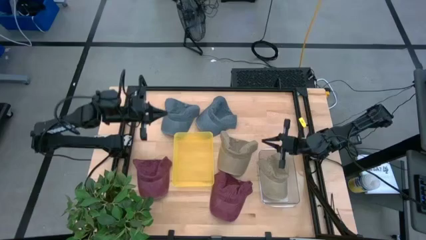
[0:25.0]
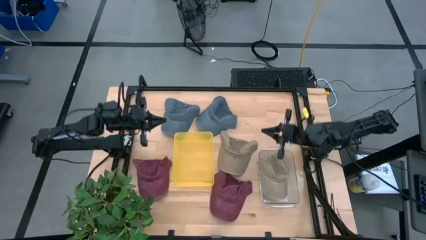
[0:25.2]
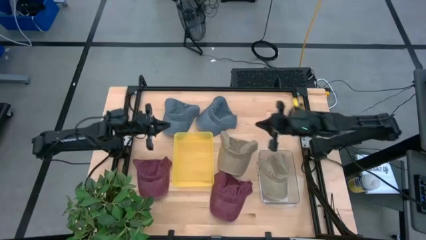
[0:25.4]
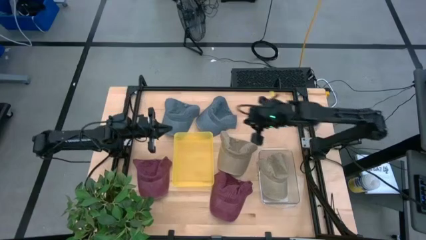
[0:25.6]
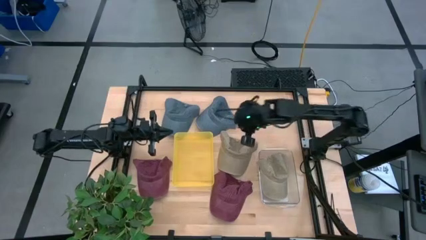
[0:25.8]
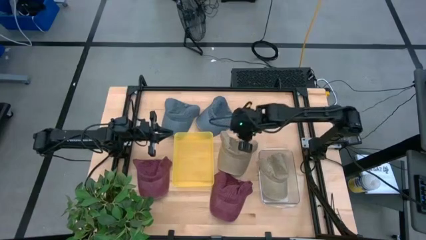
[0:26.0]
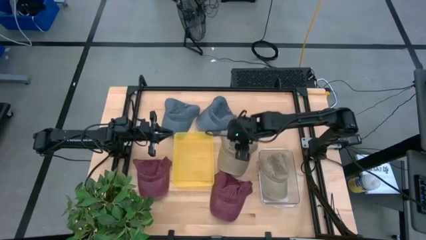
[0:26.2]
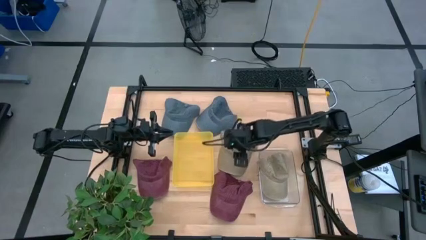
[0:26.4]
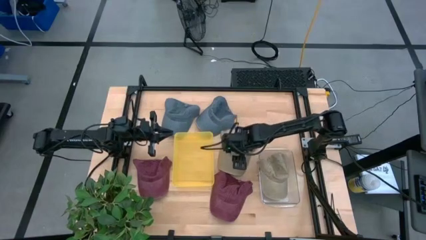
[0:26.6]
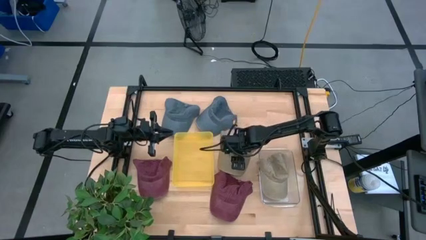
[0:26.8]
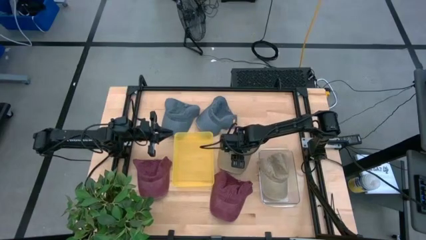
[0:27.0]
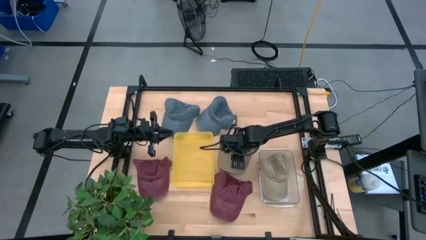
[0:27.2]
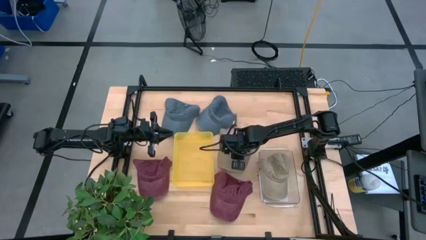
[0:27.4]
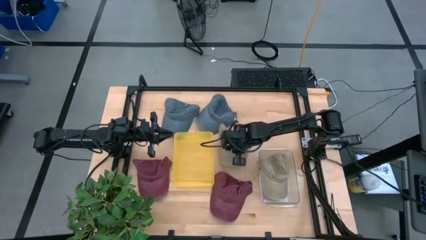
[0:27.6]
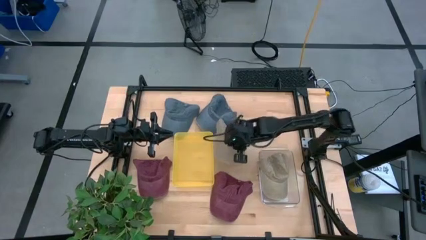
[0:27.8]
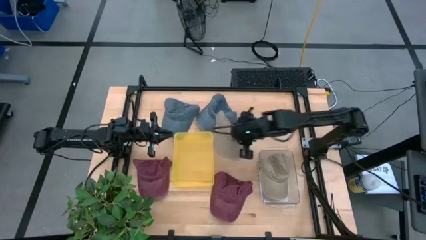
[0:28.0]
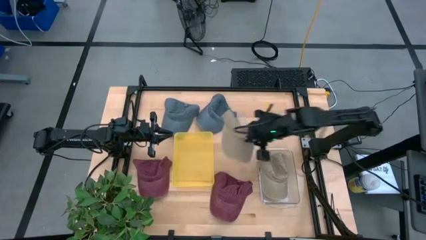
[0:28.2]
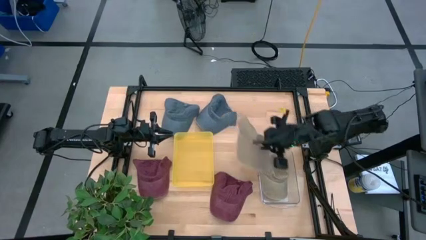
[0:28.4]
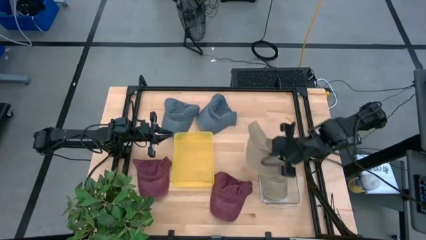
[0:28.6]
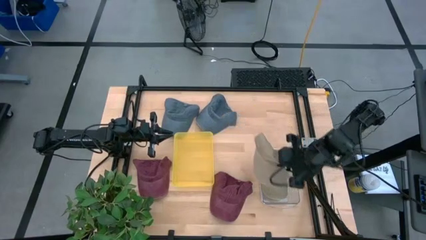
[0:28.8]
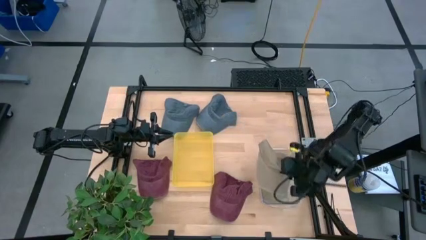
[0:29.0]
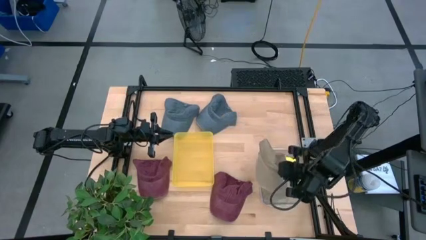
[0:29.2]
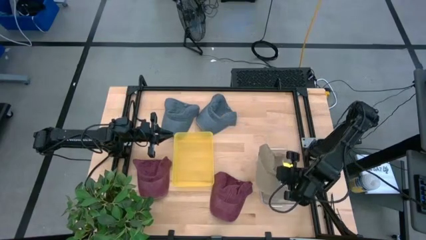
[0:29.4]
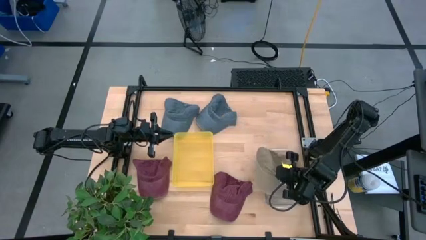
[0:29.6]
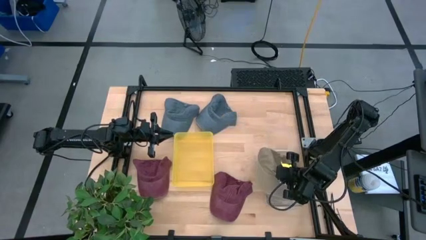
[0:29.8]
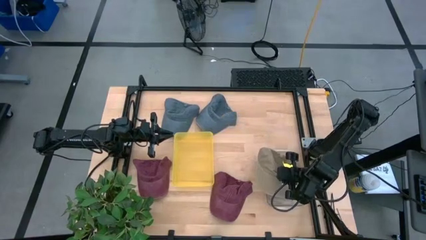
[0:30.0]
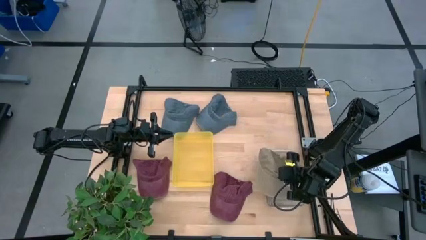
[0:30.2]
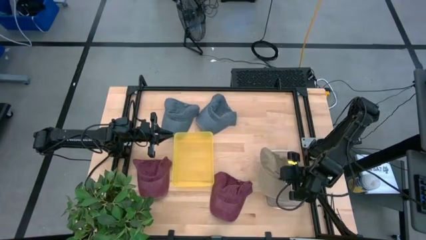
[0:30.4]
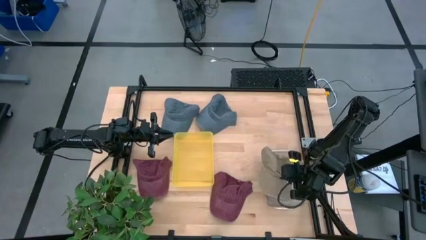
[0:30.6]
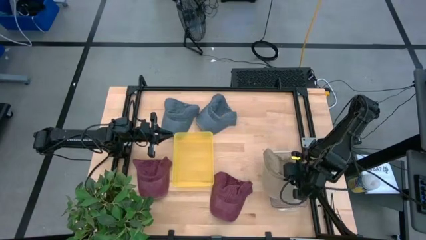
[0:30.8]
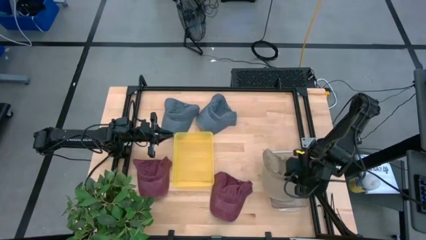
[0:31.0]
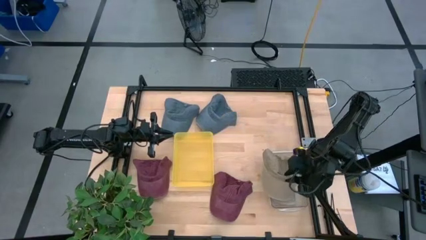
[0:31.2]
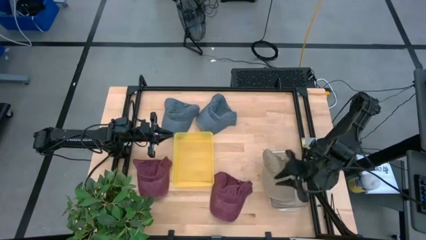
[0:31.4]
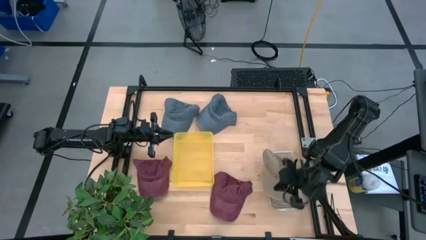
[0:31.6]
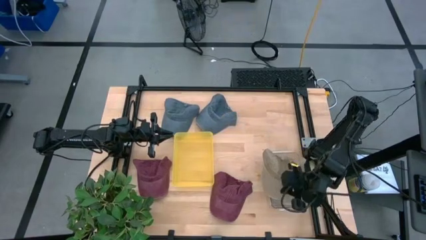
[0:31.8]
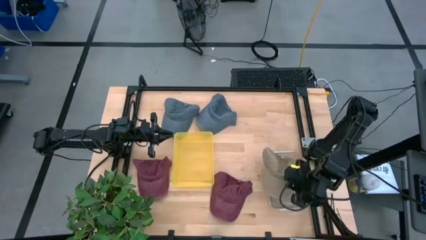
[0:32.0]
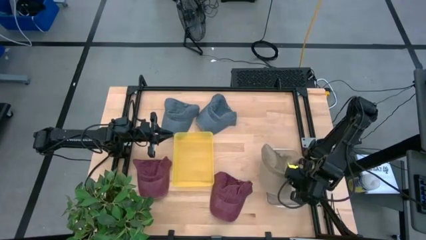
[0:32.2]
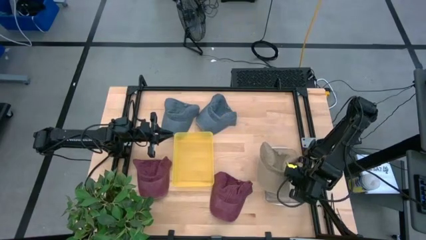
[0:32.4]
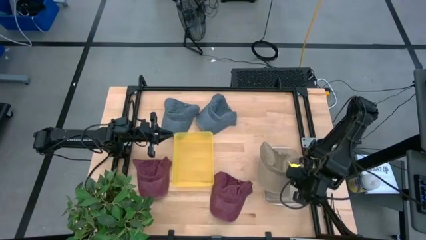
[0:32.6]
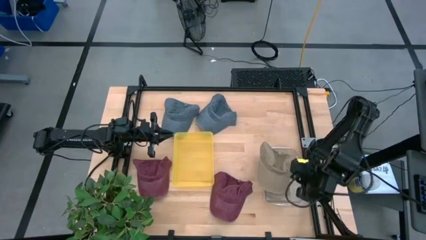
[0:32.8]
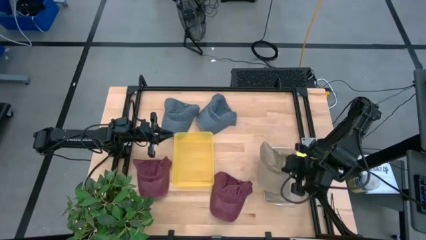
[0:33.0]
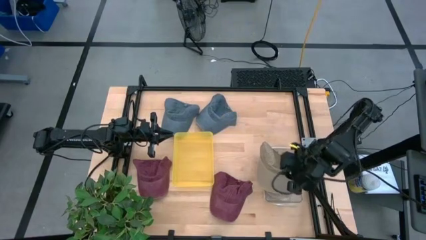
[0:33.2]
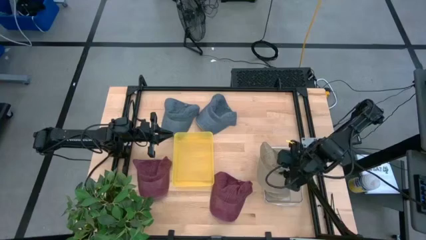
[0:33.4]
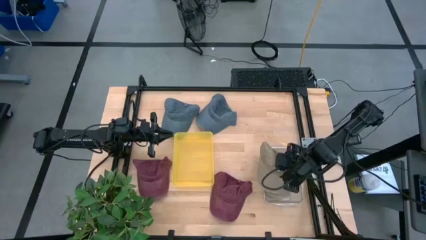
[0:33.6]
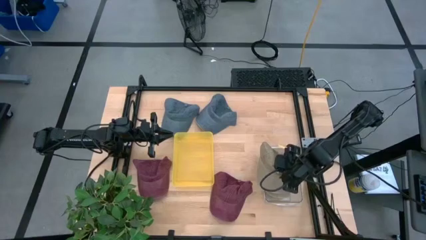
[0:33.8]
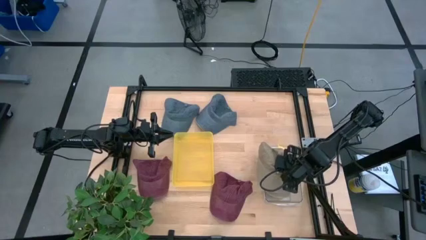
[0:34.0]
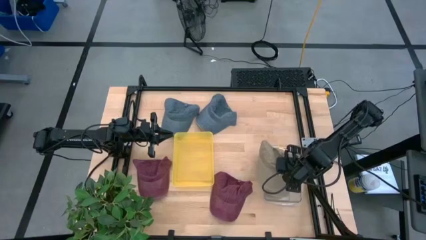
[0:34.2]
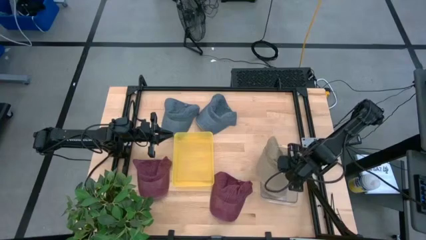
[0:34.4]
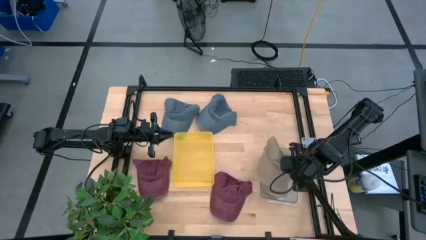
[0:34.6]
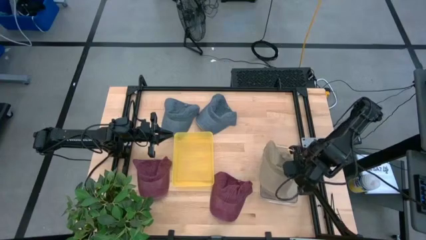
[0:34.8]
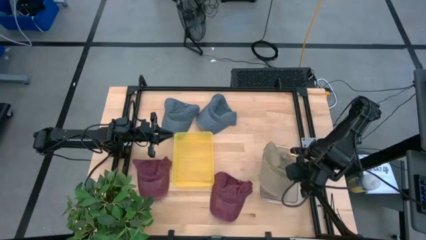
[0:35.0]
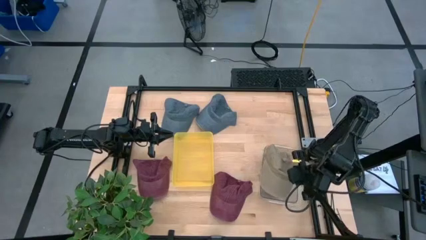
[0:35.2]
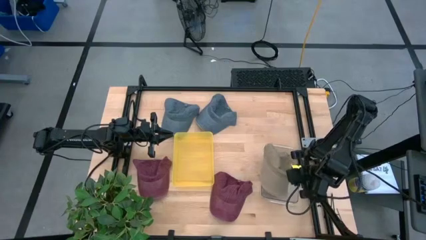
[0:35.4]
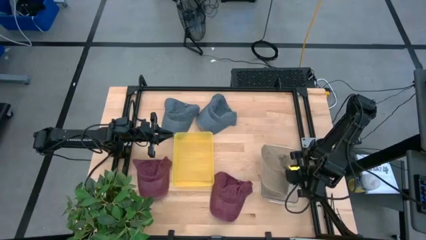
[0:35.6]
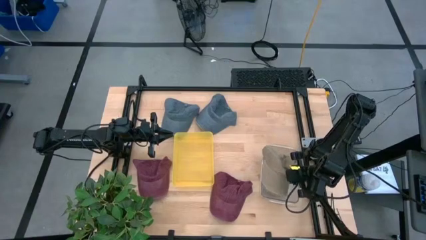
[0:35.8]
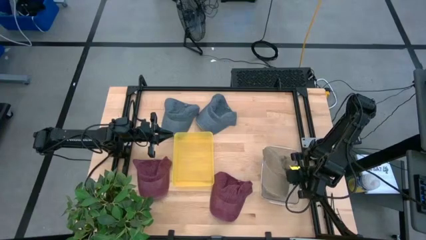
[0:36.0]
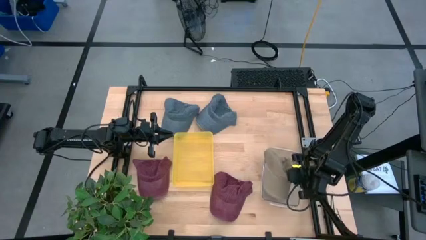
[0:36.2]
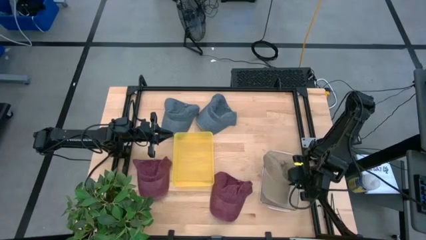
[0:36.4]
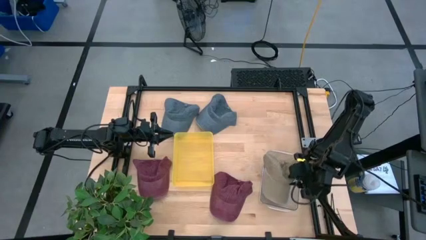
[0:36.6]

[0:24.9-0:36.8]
Task: Pick & Place hat
Put the brown cap into the transparent bin

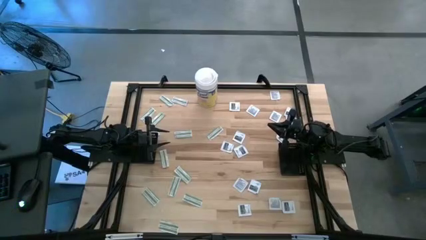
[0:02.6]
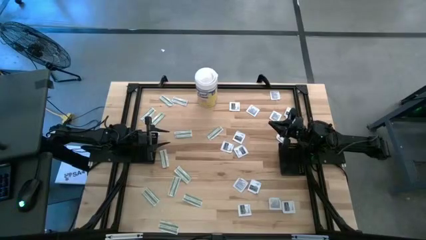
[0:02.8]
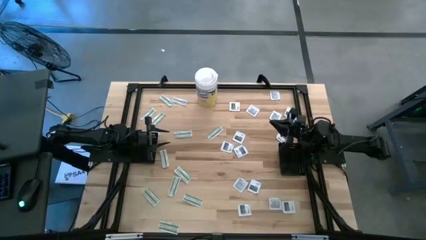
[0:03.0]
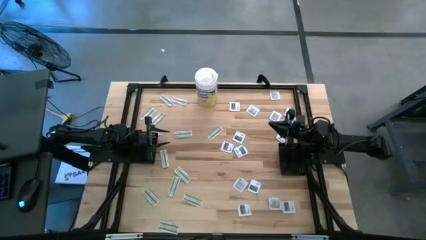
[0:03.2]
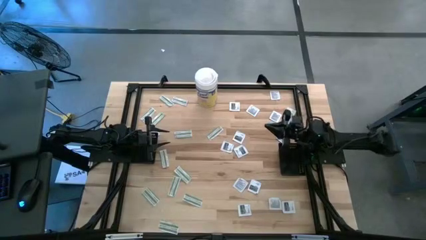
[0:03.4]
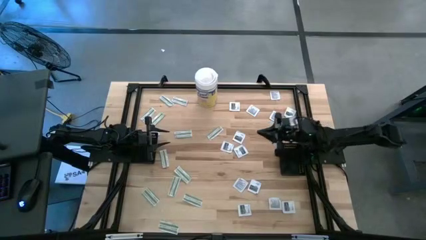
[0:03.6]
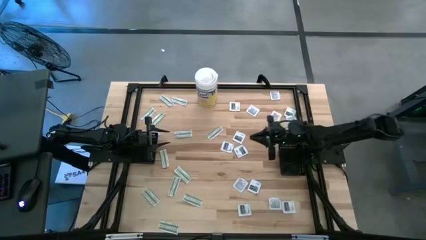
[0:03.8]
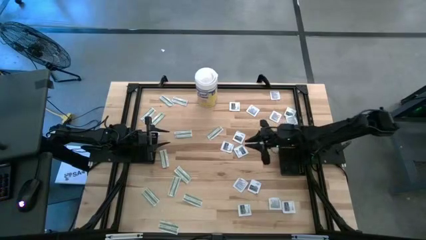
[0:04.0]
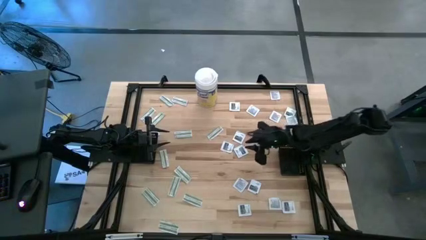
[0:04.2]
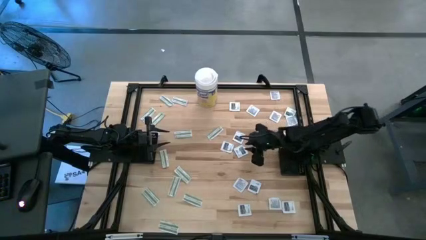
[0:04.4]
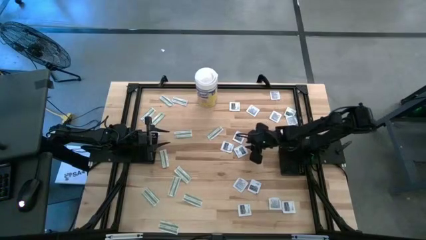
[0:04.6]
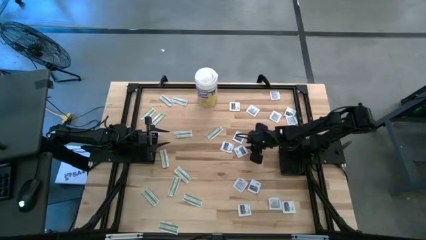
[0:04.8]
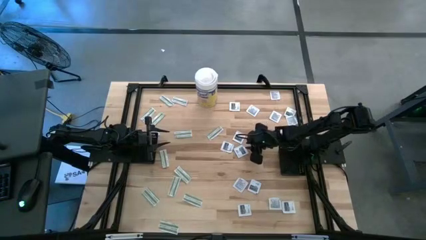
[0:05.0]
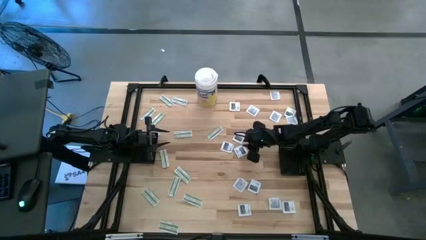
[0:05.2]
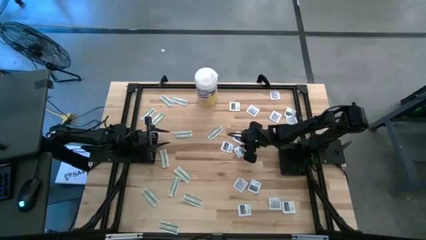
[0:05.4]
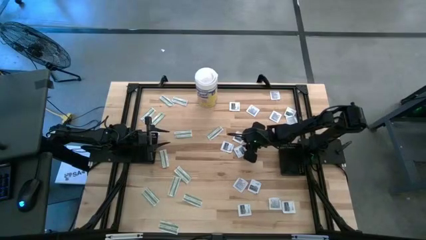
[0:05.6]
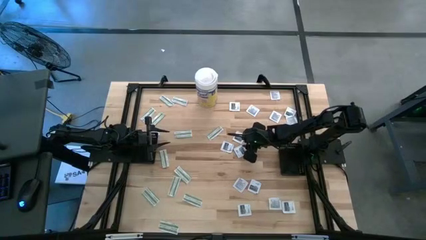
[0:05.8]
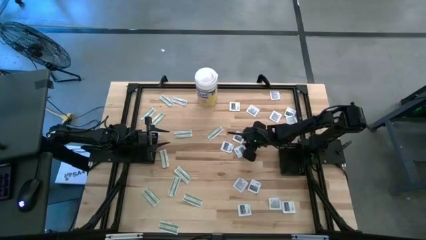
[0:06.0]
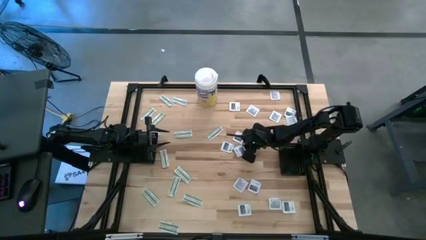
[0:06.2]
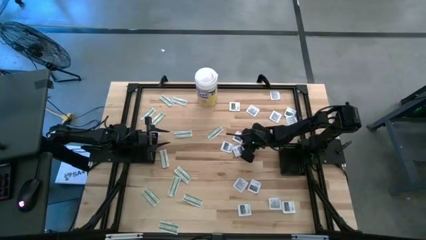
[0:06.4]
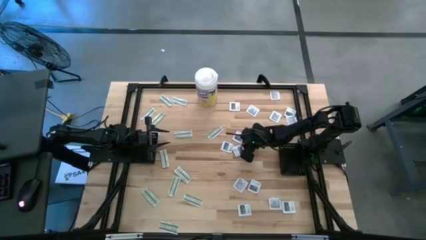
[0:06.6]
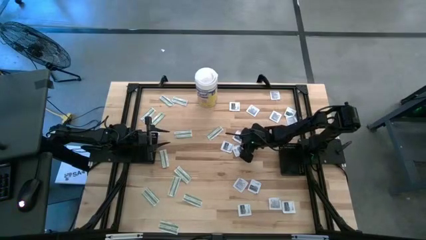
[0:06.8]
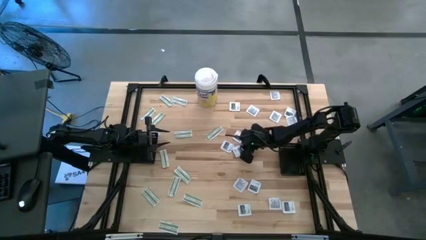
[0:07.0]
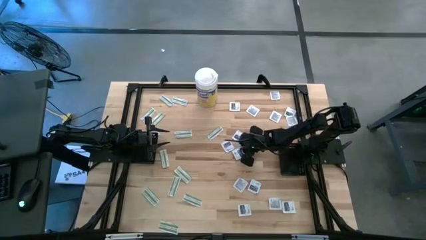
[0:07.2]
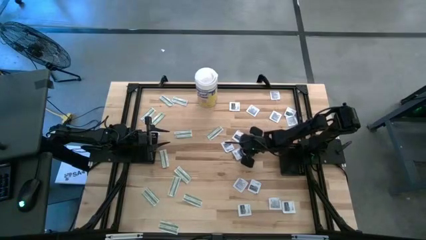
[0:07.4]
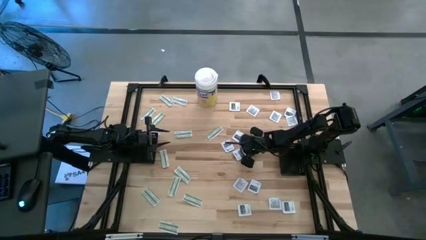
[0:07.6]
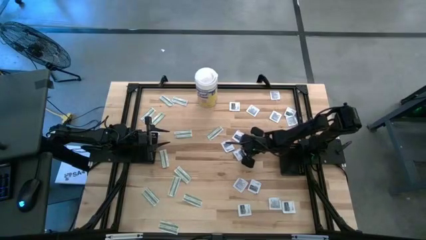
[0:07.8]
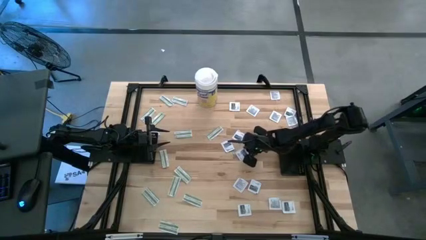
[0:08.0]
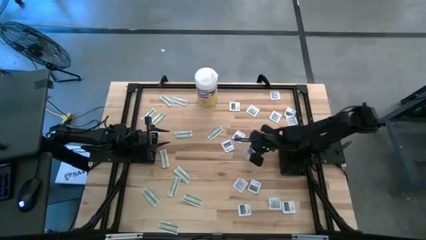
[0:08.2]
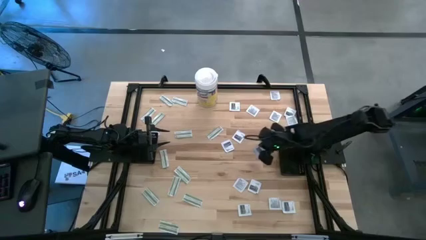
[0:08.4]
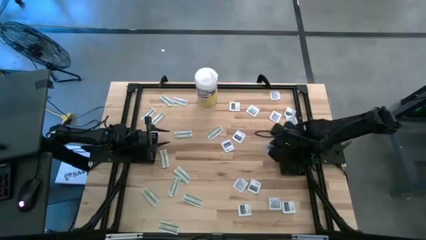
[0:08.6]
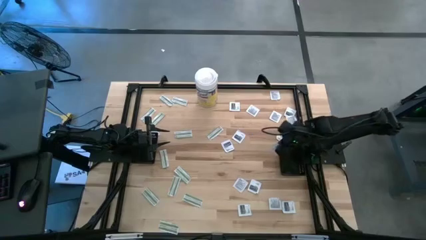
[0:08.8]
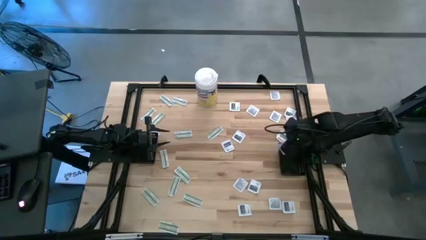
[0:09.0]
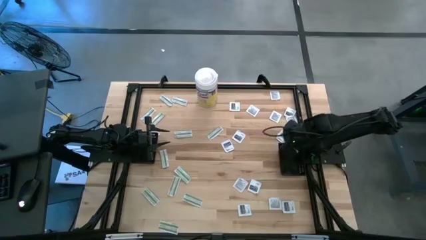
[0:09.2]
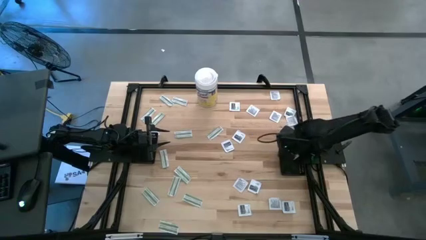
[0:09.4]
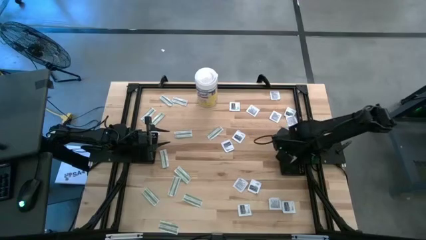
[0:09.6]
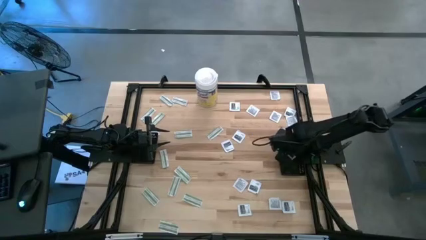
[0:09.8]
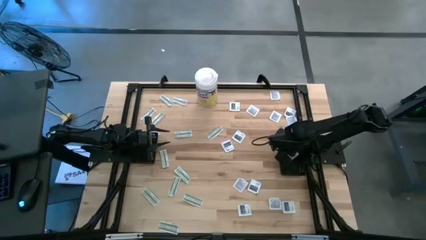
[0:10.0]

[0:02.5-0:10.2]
Task: Pick & Place First Aid Supplies
Put the towelette pack into the right black basket
